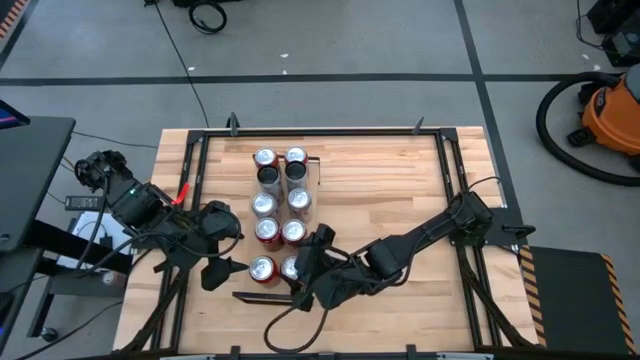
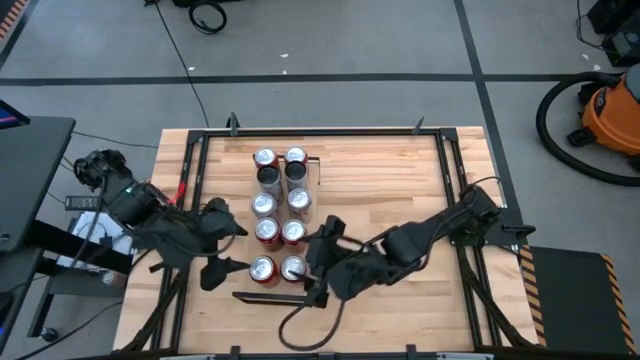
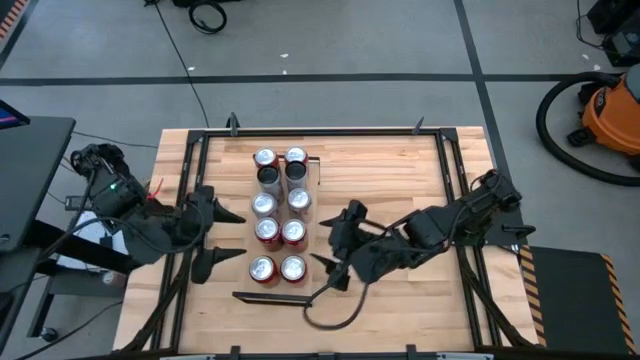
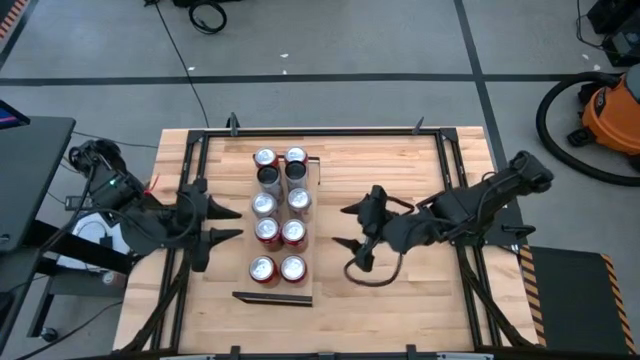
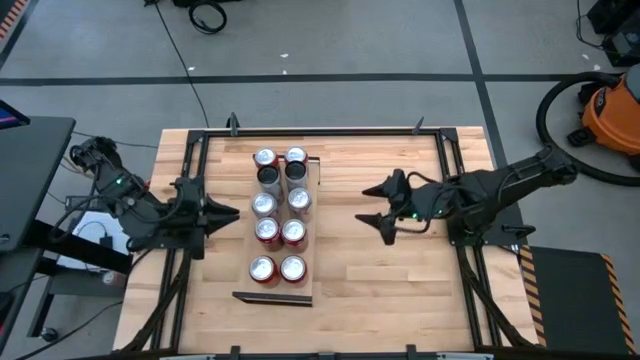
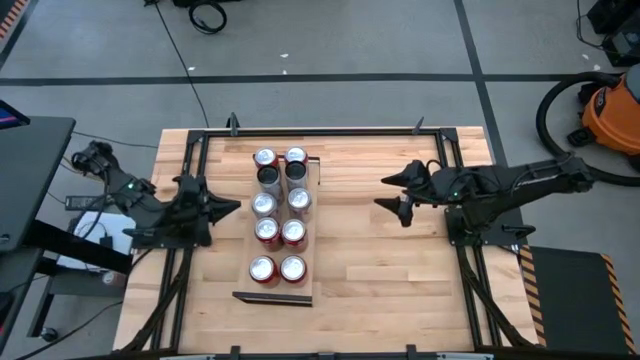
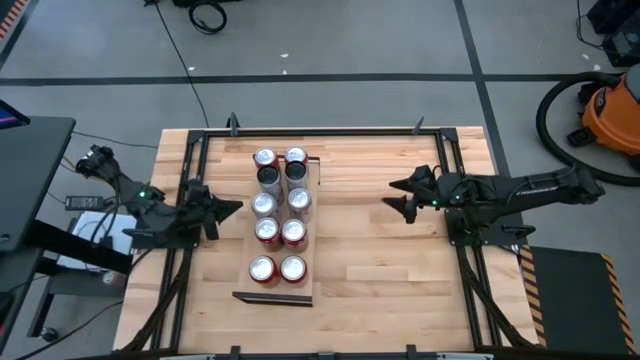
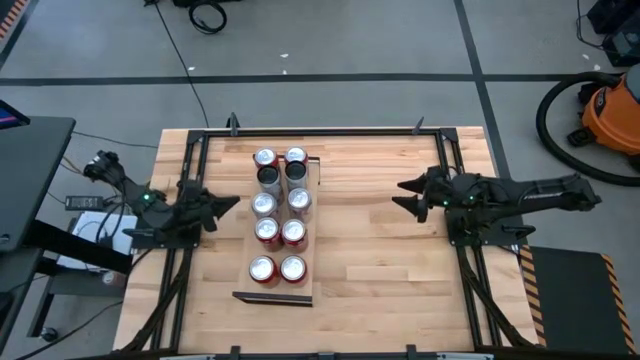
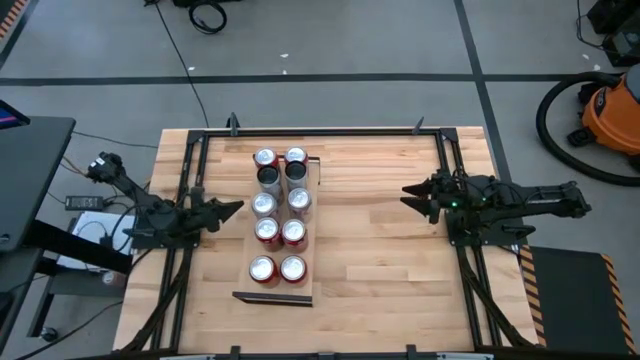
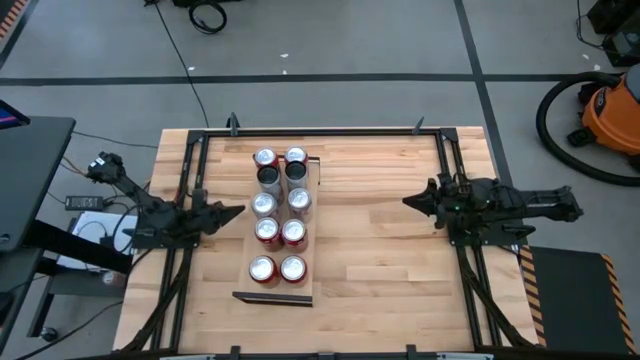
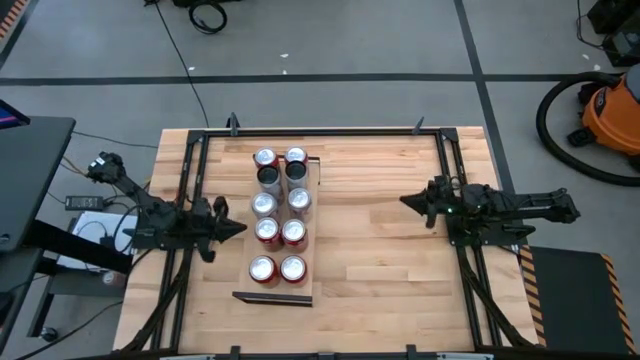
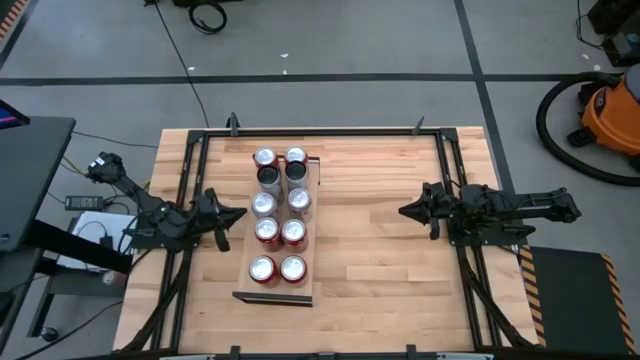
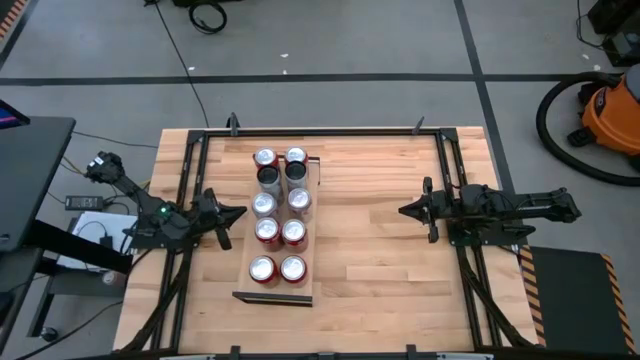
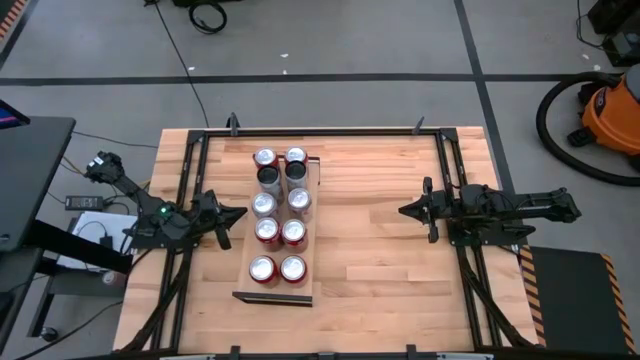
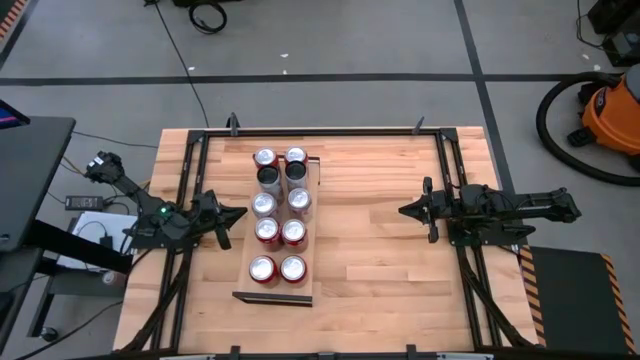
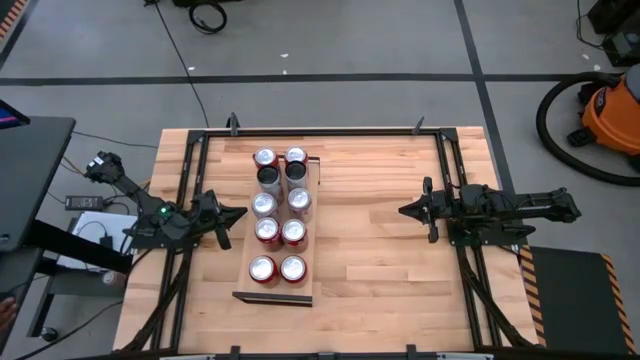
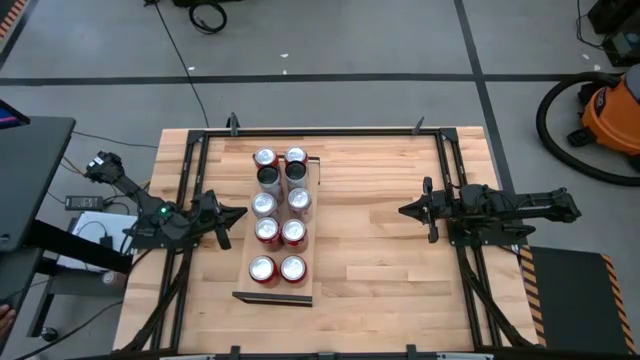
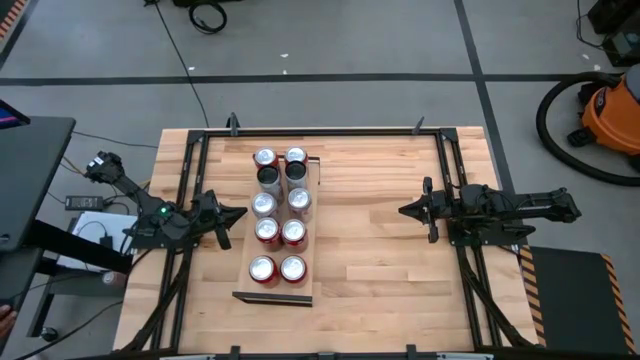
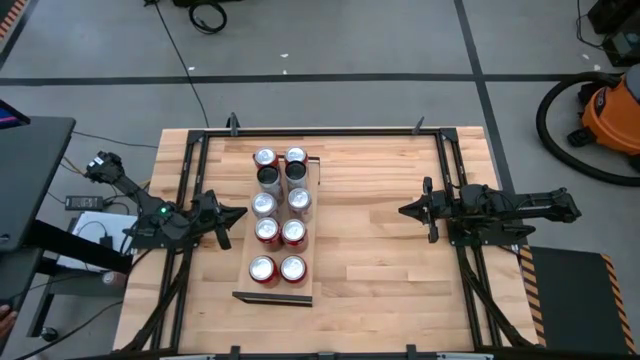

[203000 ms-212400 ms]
Task: Place canned beverage on shelf
Return to Home Position

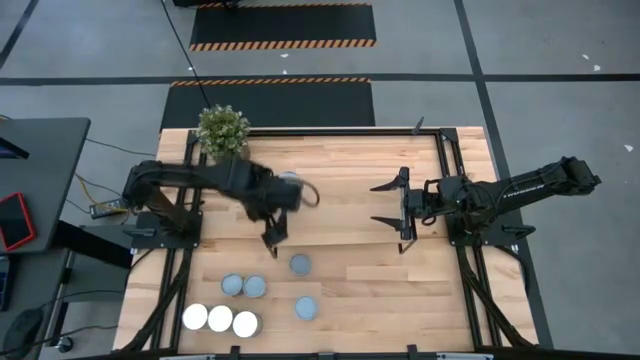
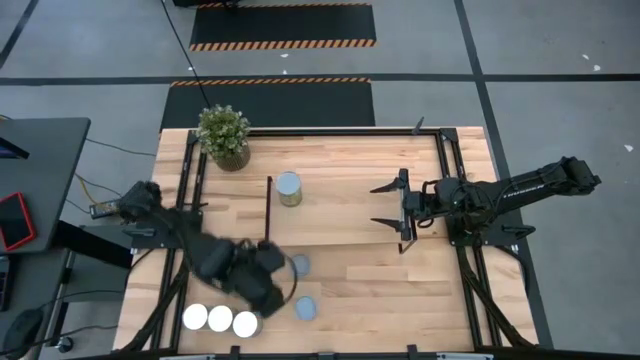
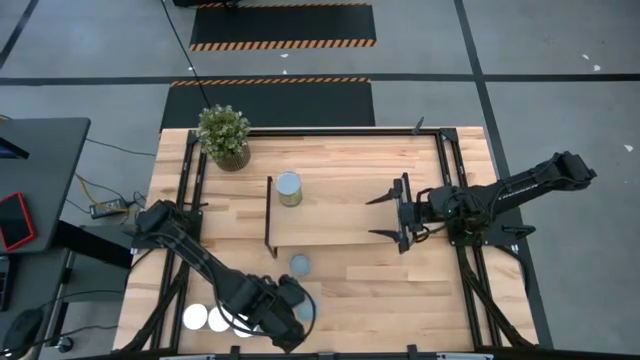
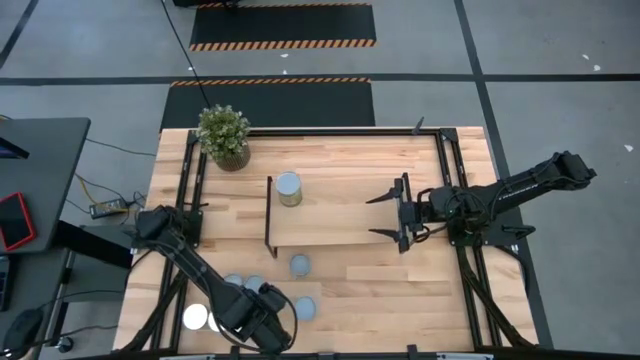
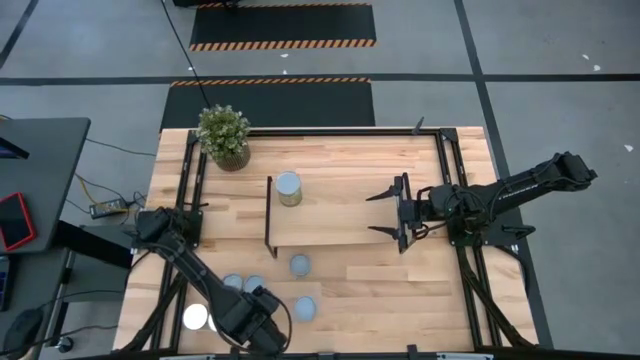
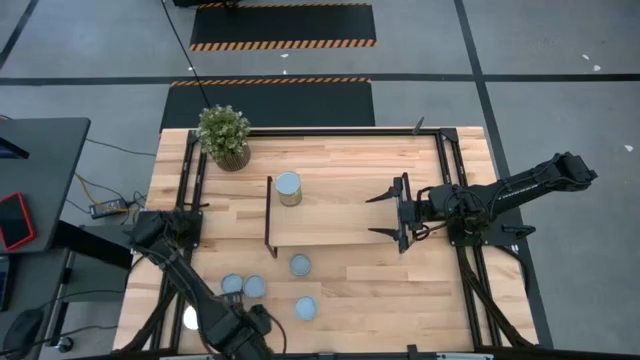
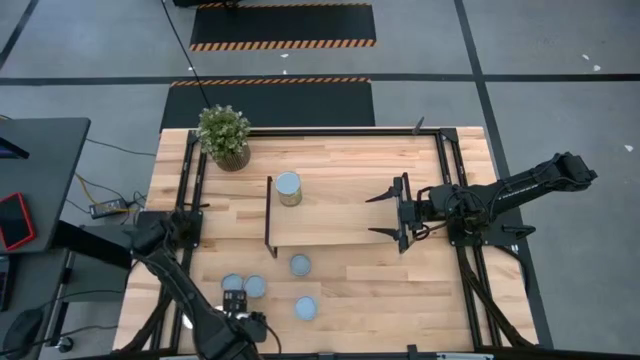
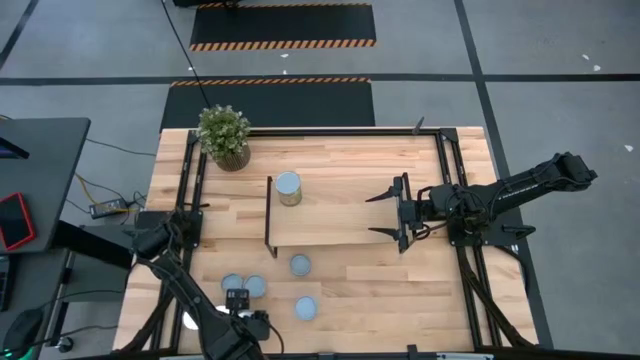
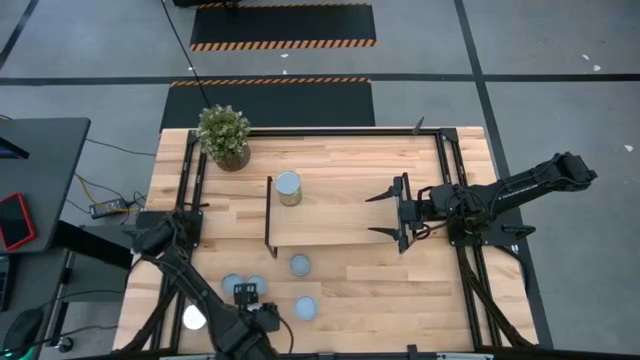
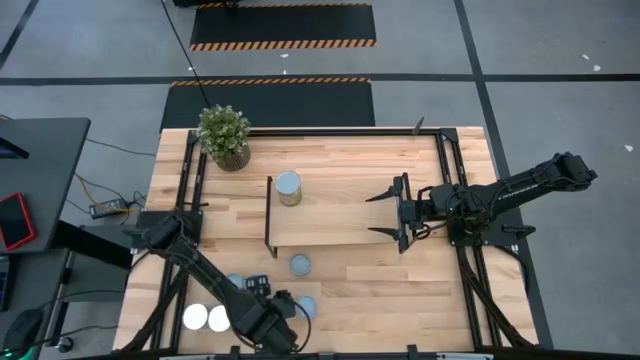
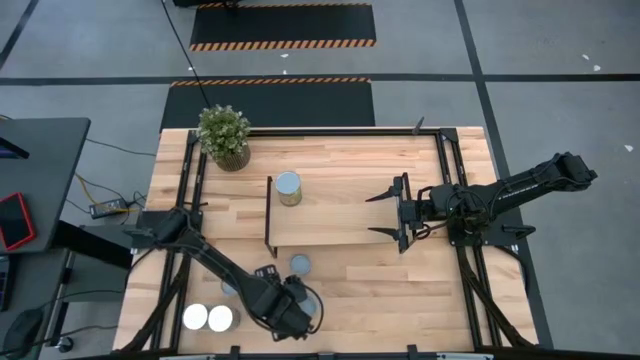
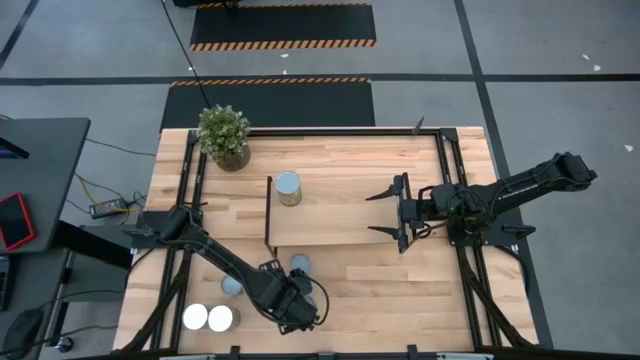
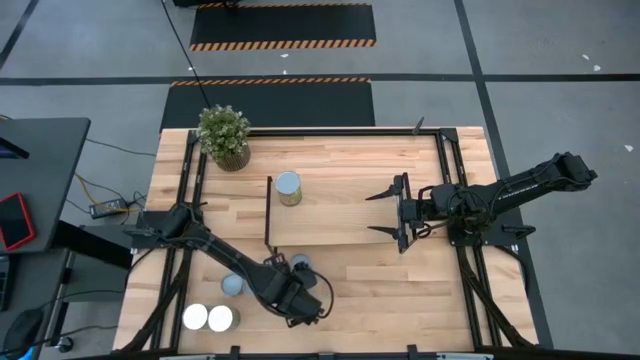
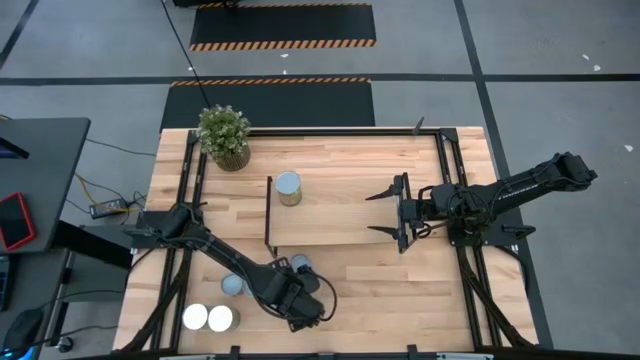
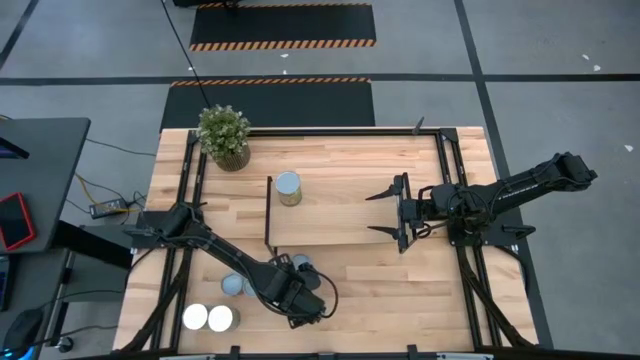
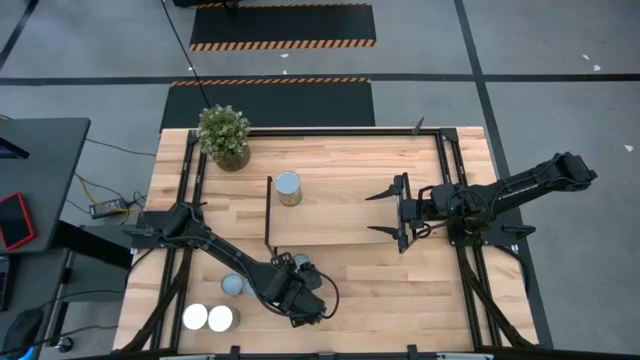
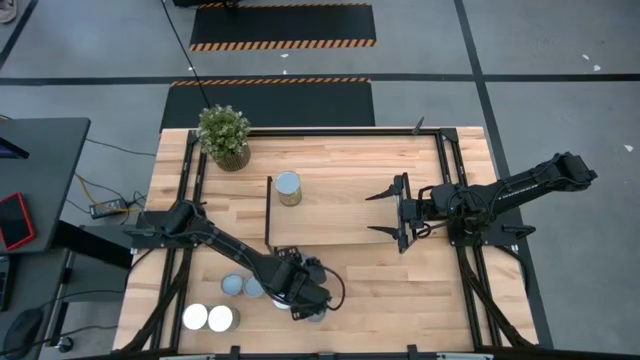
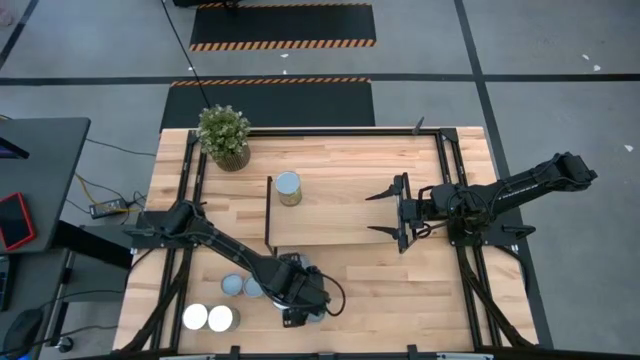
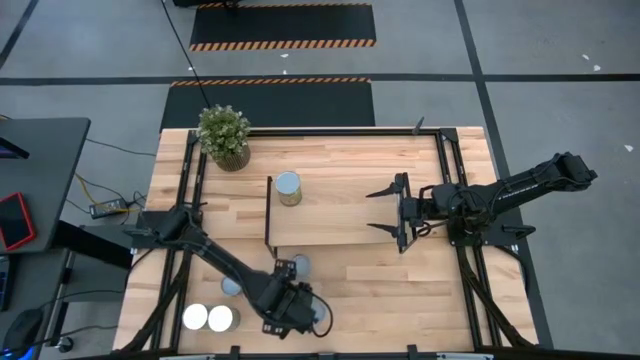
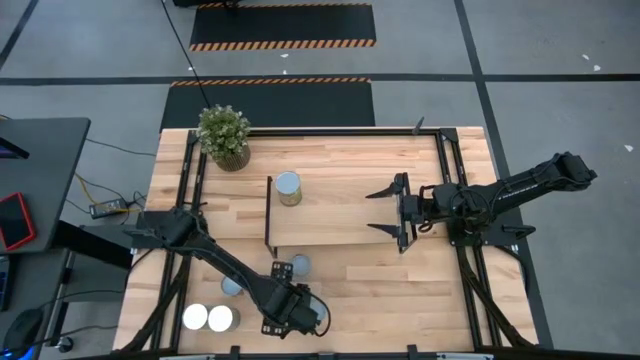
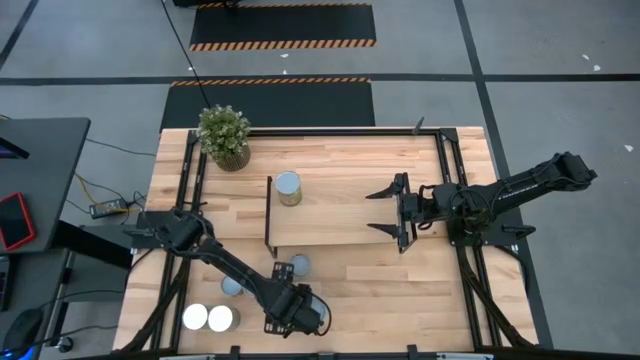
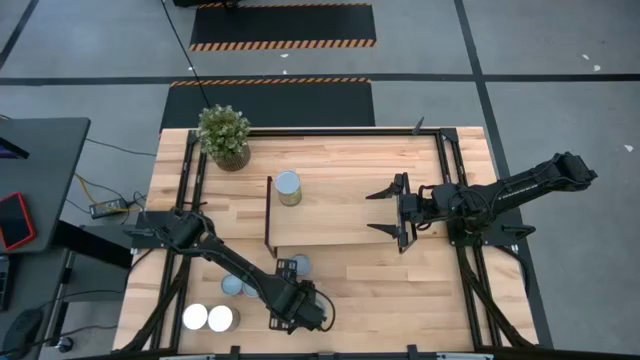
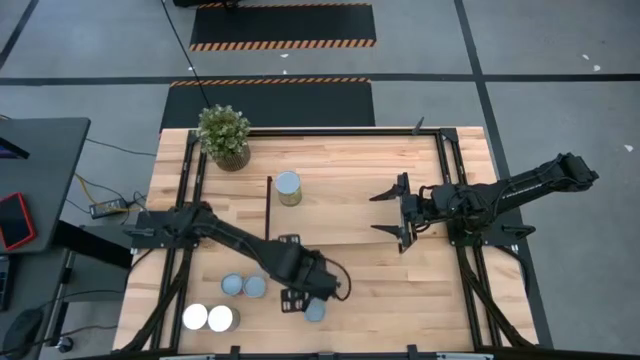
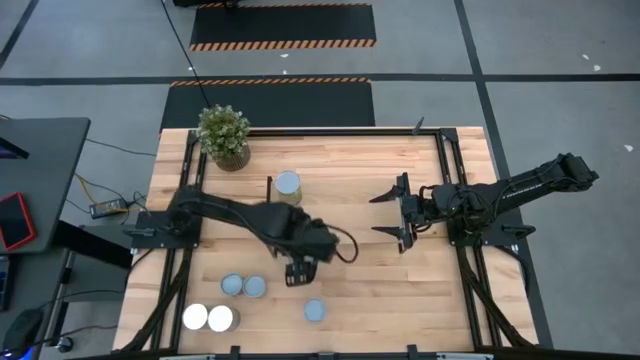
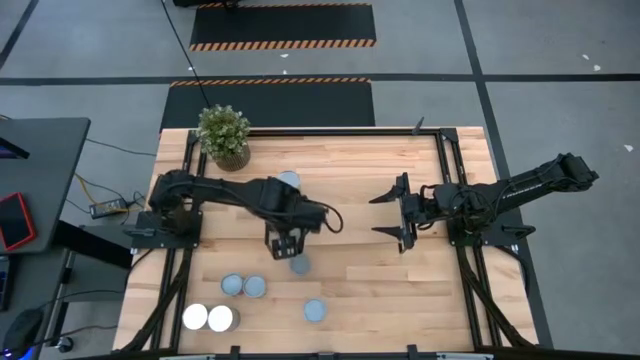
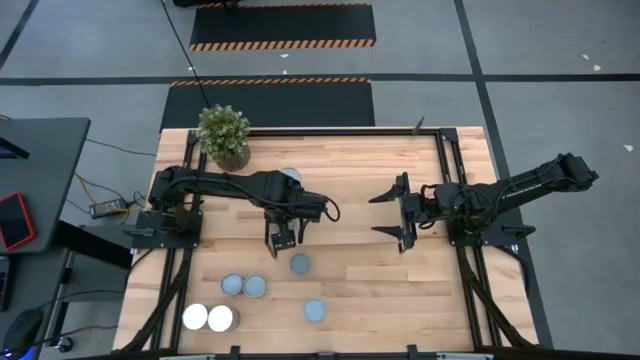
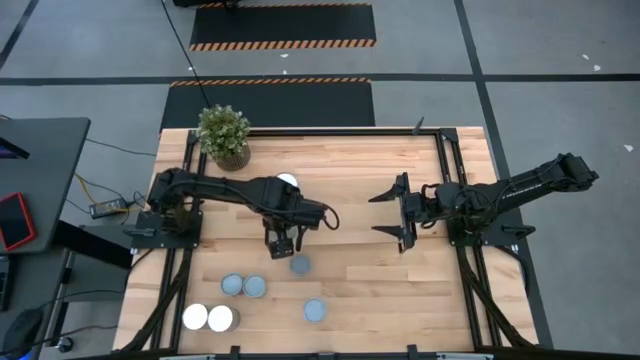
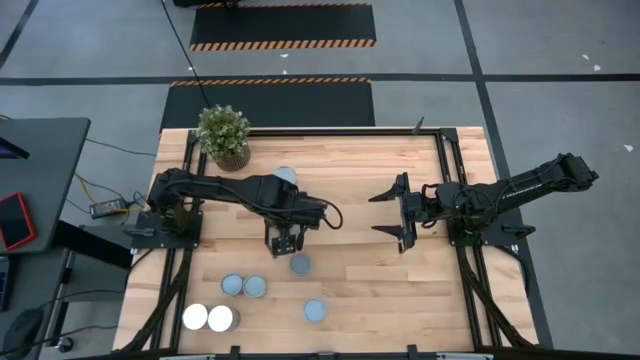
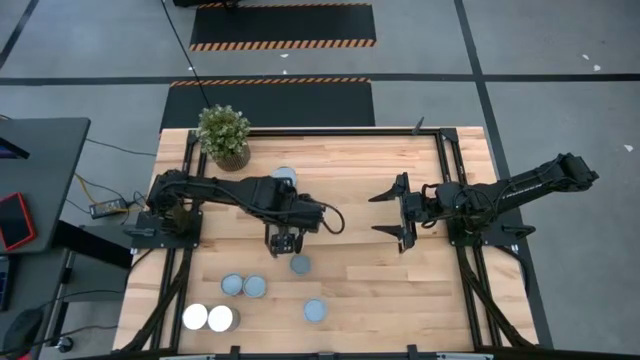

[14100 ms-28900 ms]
Task: Pick and place cans onto a shelf
Put the canned peas on the shelf
